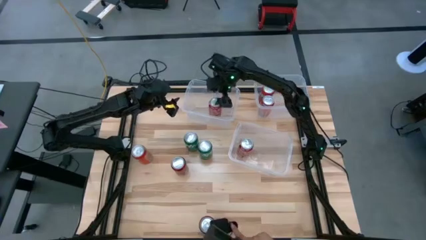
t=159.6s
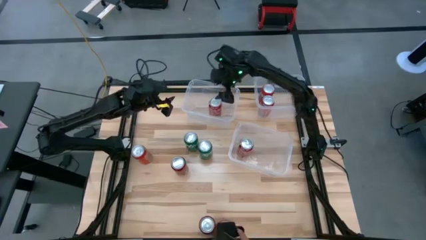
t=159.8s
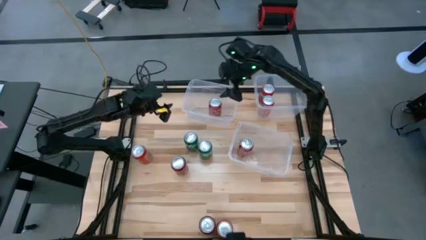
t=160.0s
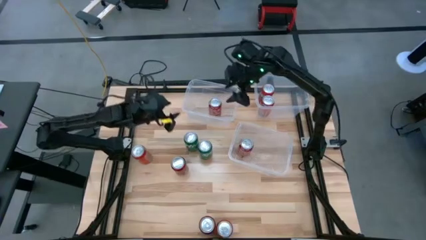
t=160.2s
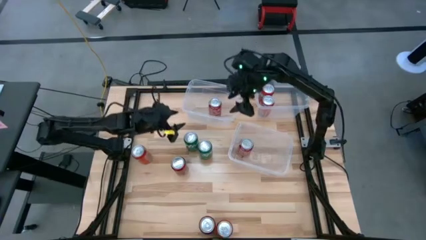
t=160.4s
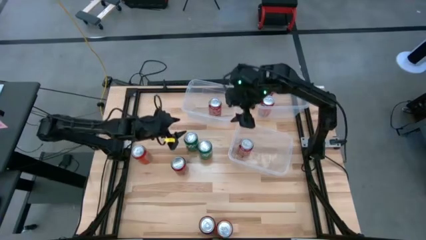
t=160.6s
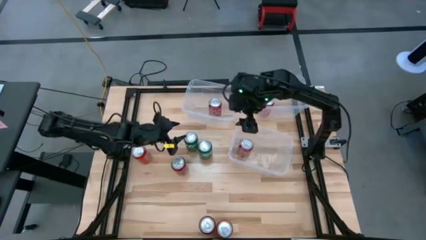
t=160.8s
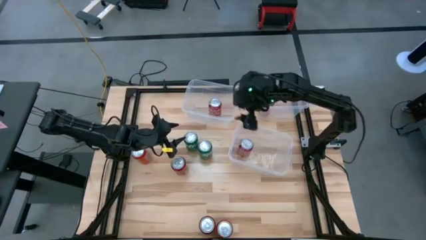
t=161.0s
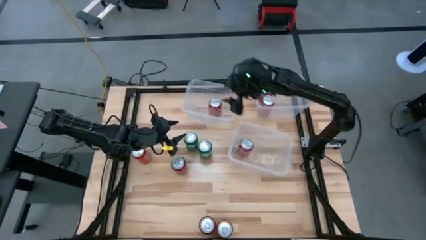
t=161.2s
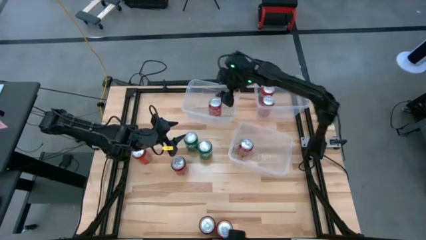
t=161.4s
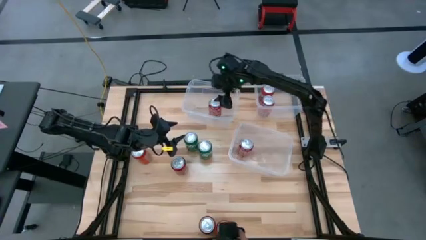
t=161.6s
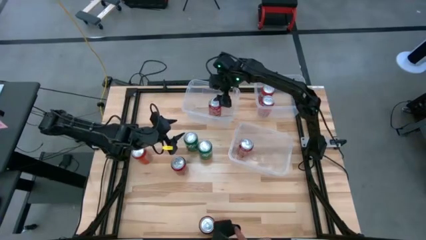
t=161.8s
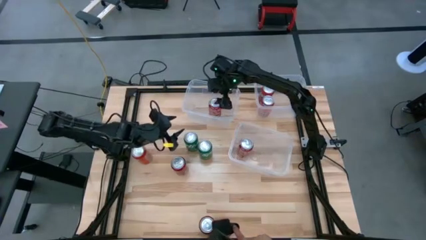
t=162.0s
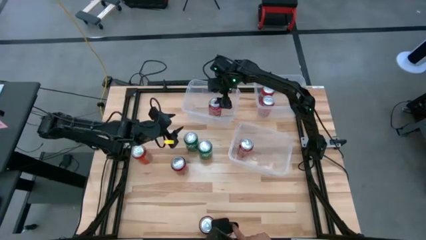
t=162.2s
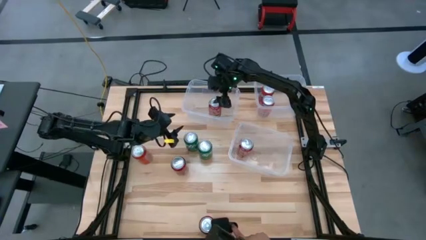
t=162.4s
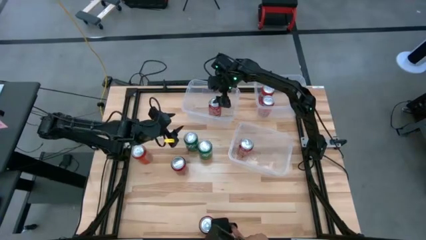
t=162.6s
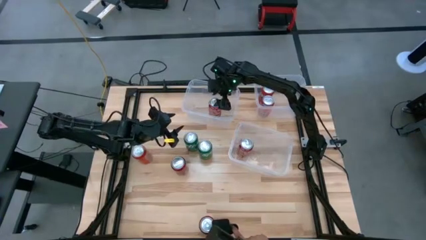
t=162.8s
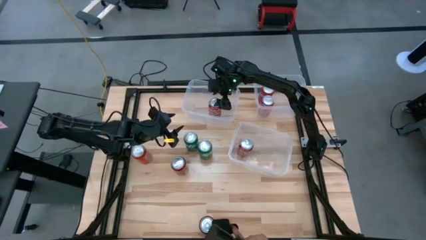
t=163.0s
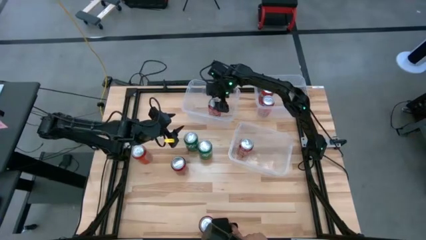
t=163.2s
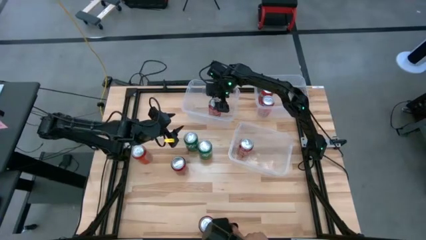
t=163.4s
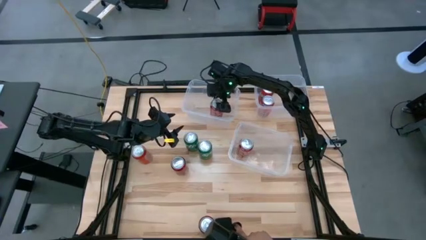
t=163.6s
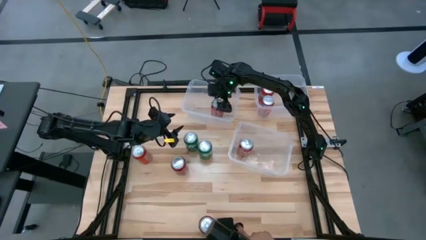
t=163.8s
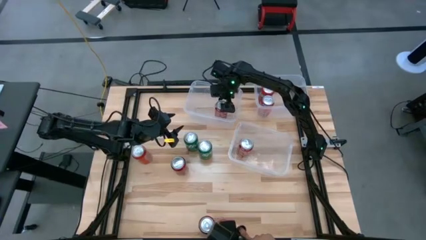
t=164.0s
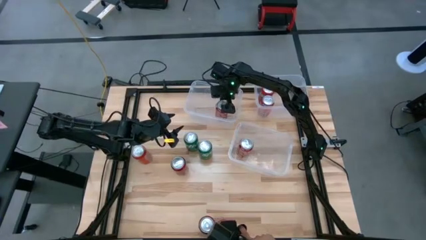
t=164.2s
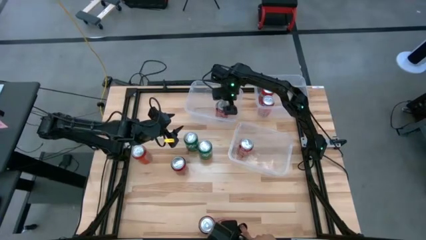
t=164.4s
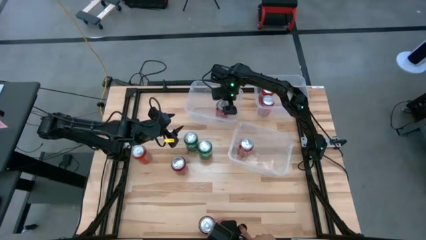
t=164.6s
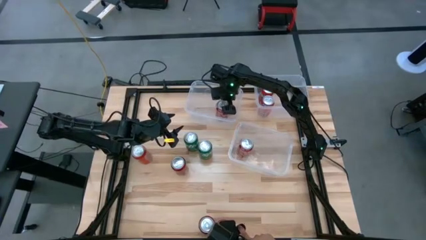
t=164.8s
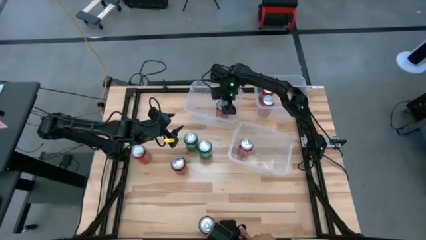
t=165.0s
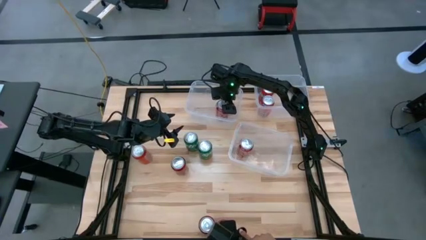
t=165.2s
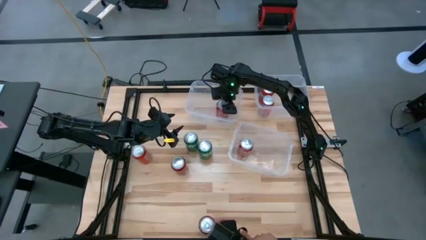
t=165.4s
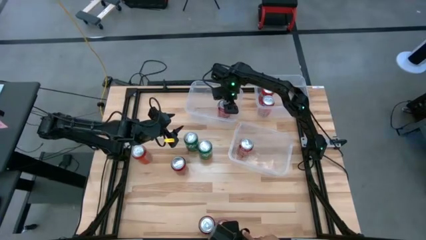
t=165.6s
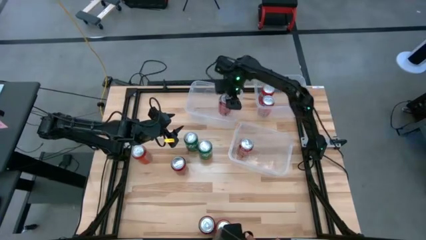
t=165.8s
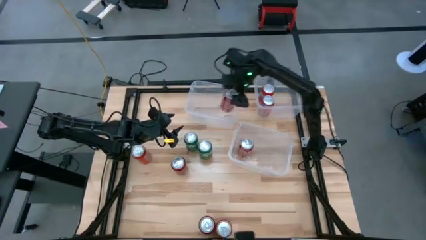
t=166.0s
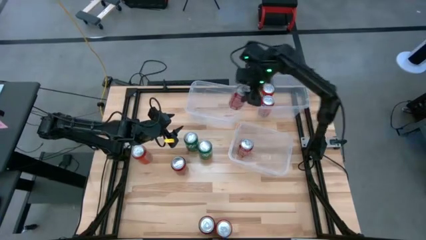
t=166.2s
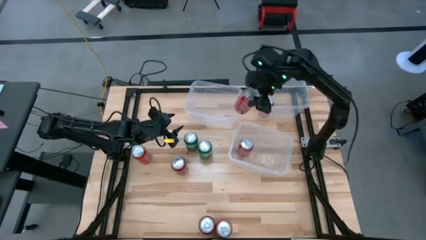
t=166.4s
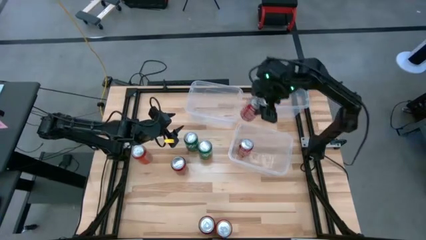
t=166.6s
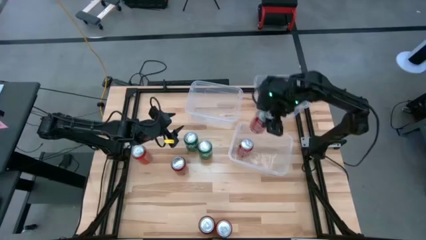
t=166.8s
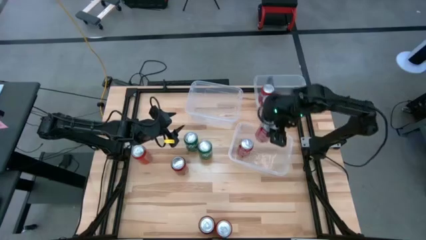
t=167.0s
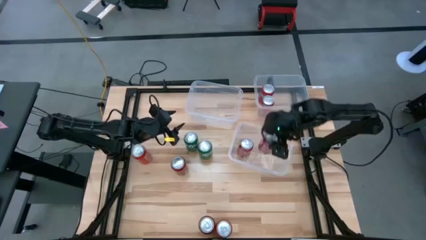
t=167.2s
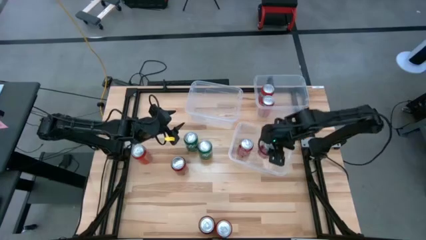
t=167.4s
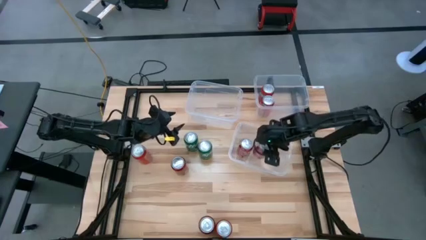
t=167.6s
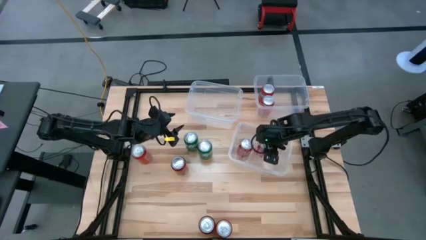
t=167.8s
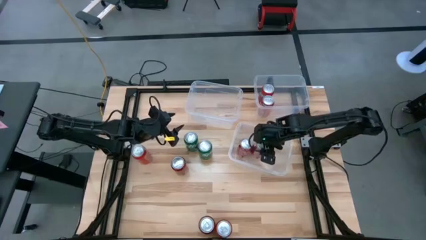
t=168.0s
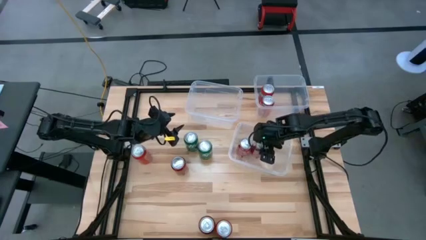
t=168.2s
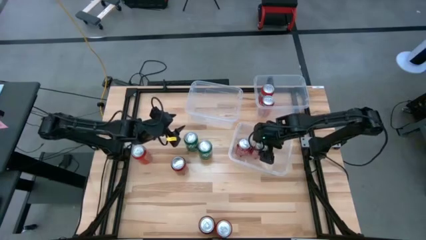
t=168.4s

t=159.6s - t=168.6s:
Task: Sort soda cans
Put the top red-white soda can into the bottom transparent bin

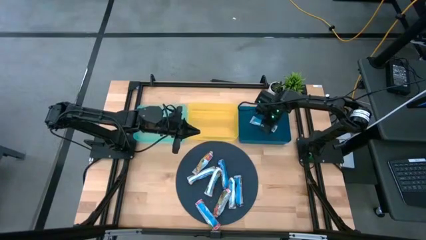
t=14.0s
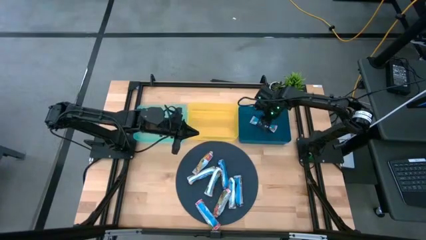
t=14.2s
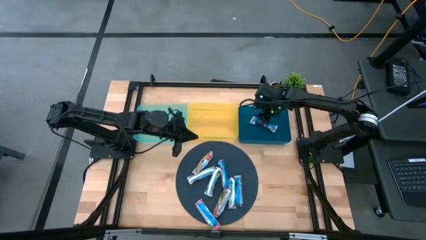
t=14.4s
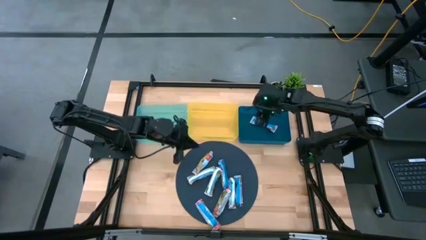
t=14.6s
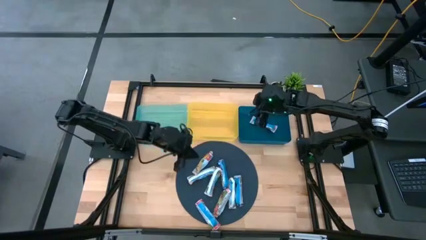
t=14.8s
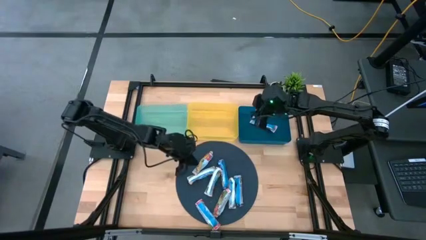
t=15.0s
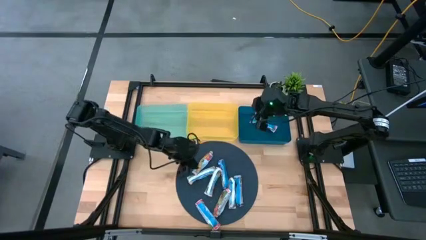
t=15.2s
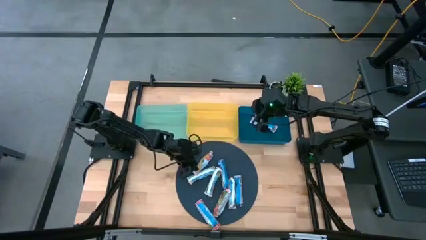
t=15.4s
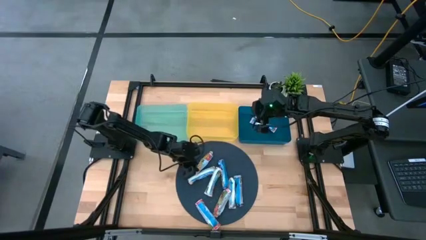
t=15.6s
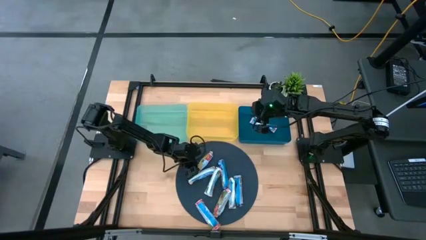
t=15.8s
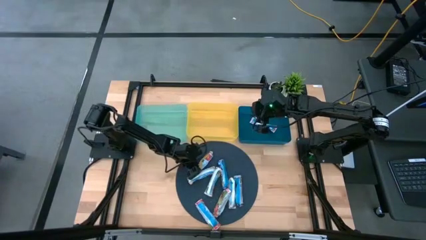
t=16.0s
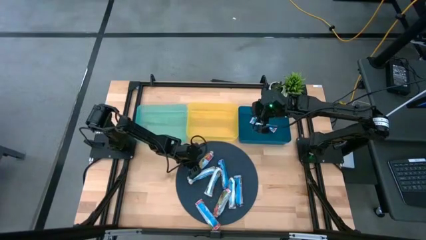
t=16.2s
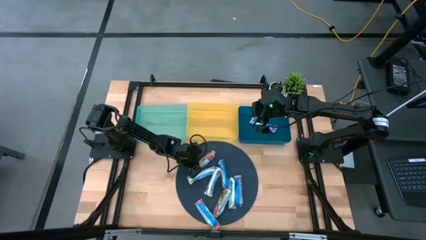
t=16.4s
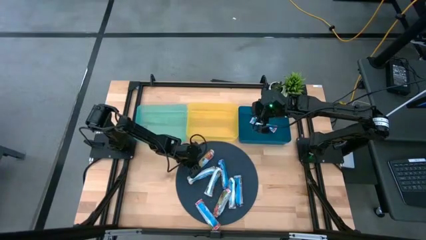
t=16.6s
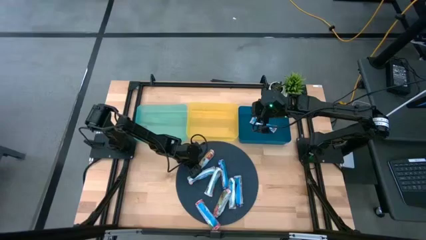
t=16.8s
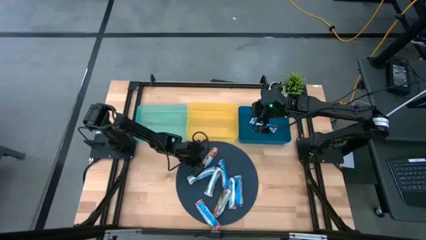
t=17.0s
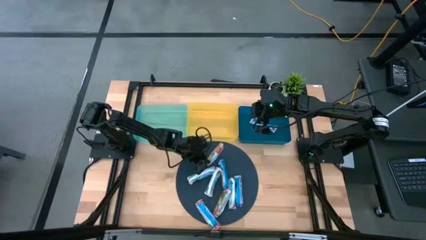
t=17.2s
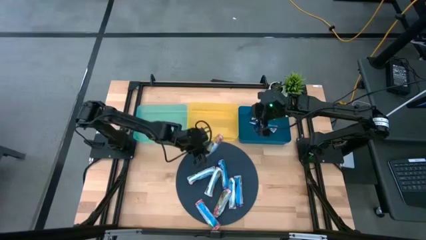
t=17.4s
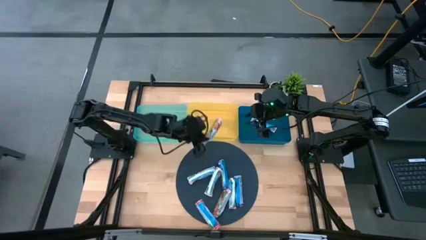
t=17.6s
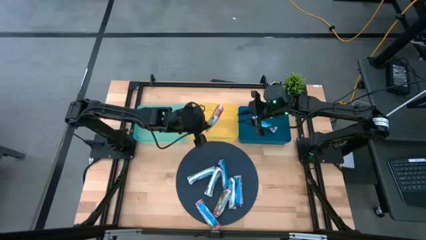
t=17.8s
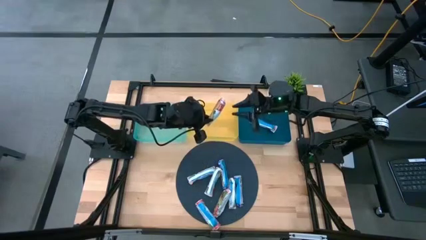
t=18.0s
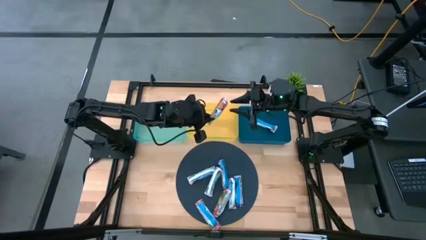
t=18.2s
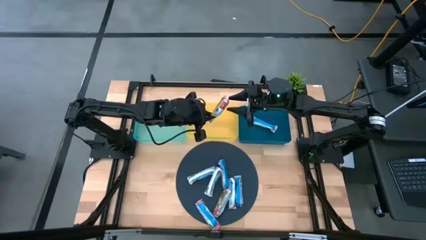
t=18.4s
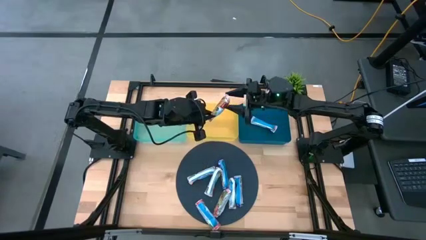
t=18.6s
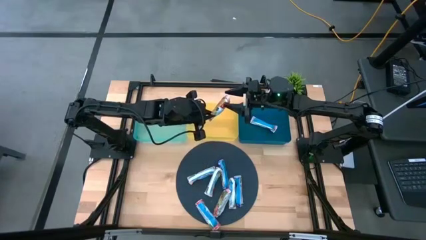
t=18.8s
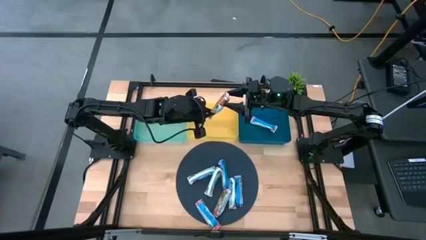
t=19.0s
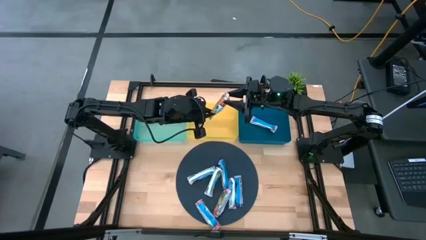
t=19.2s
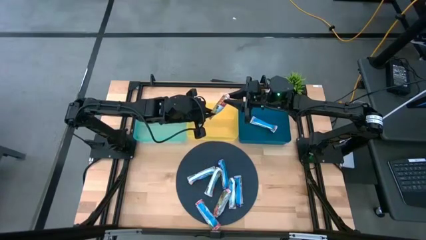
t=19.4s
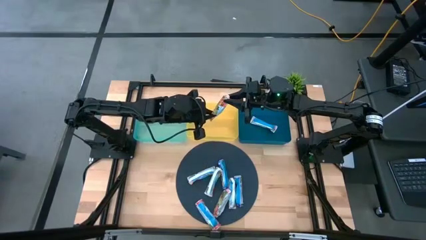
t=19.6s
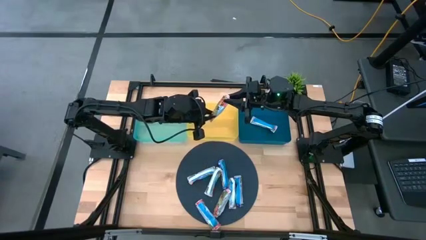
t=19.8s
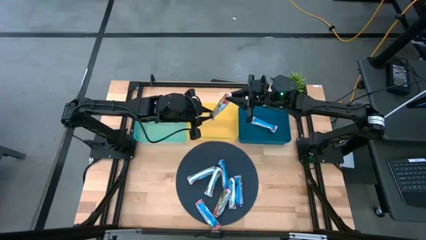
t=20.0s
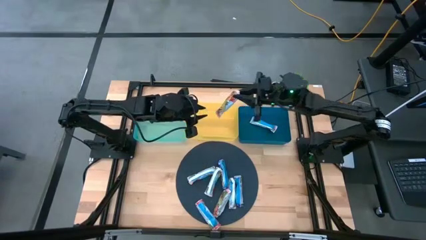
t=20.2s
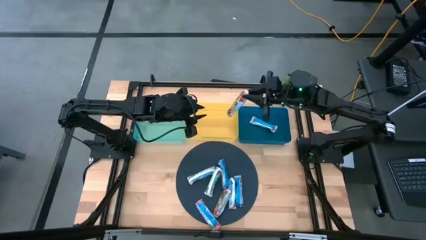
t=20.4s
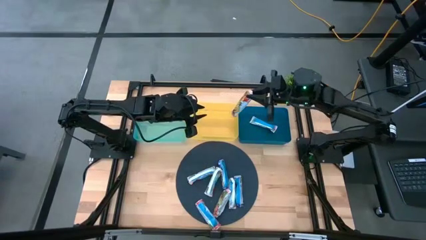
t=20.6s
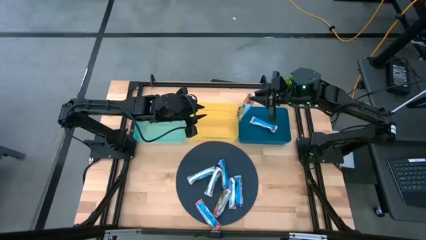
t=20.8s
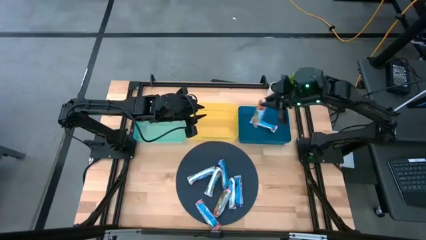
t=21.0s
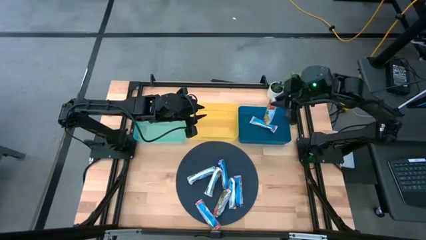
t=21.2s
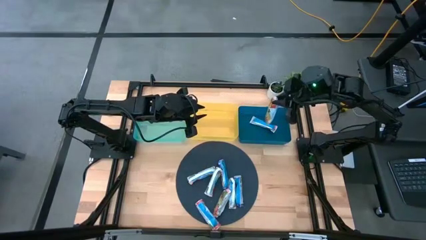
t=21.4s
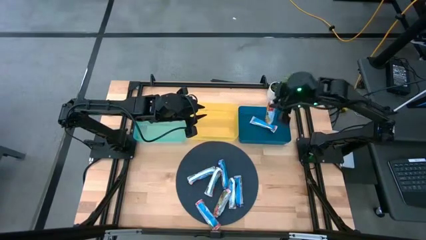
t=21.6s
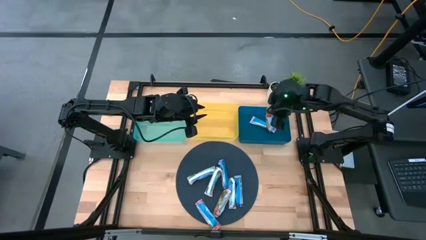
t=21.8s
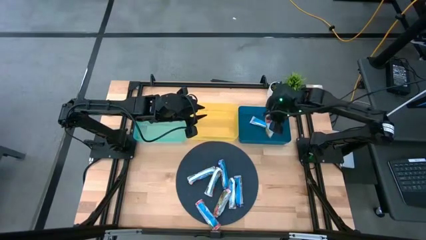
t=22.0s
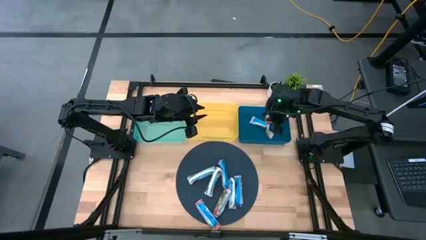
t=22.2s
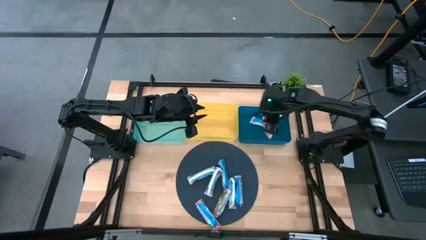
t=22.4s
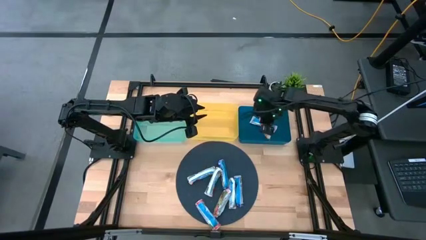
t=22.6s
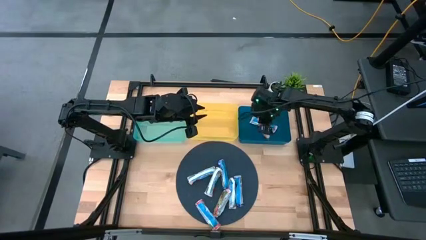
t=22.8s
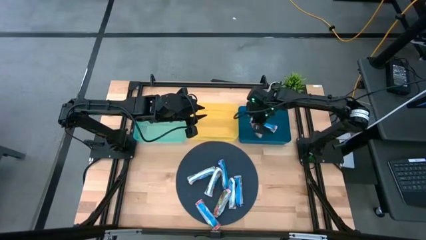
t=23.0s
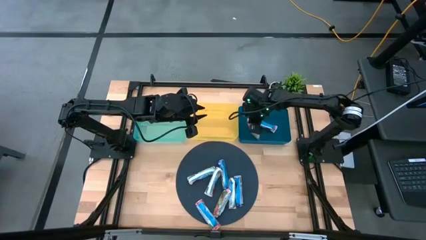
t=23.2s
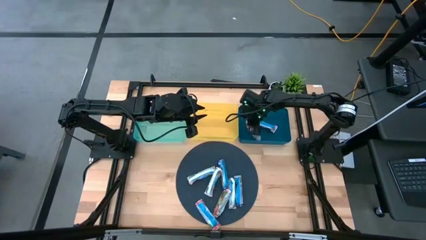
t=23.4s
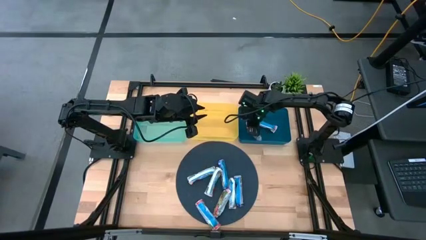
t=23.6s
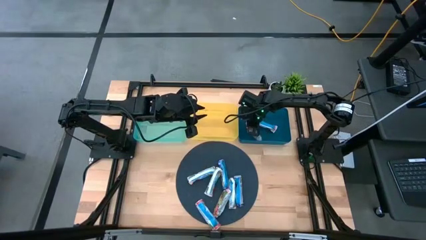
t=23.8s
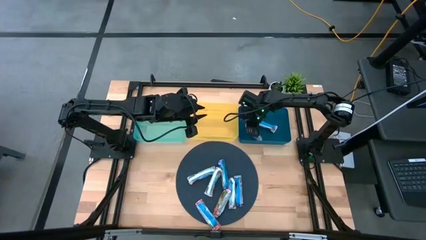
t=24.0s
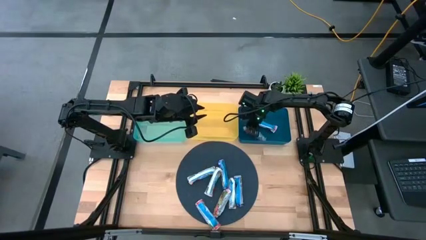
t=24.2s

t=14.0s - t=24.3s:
Task: Pick and place Granola Bars by type
Put the red granola bar into the blue bin
